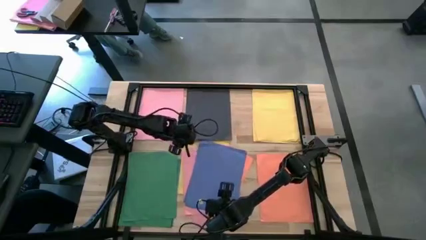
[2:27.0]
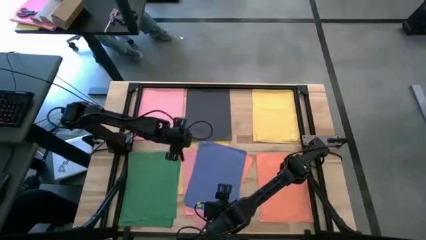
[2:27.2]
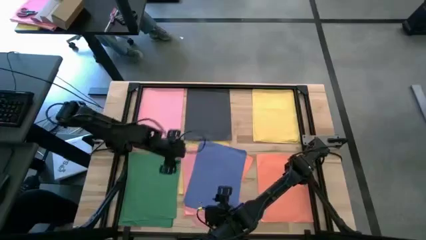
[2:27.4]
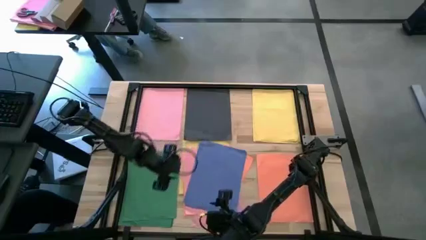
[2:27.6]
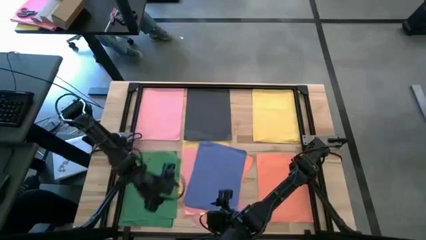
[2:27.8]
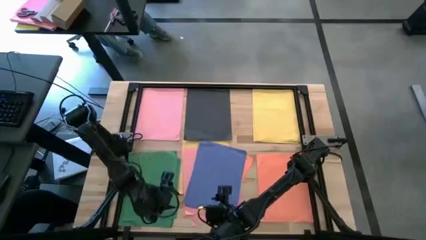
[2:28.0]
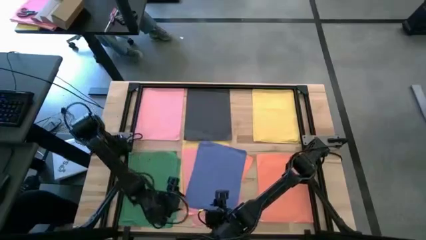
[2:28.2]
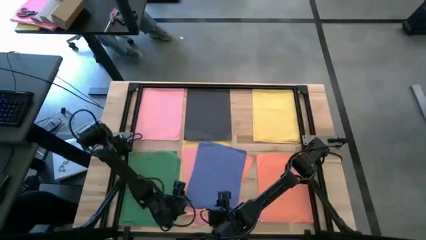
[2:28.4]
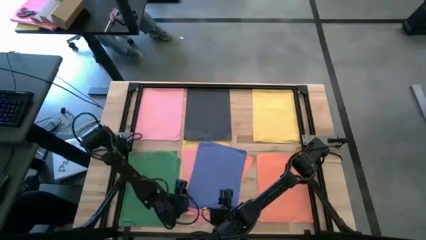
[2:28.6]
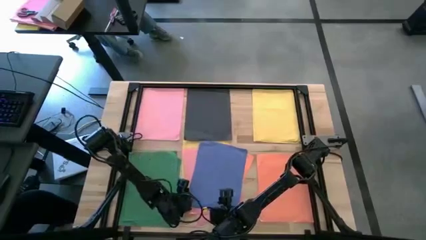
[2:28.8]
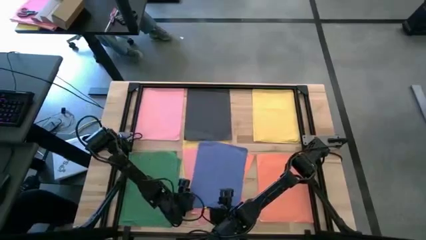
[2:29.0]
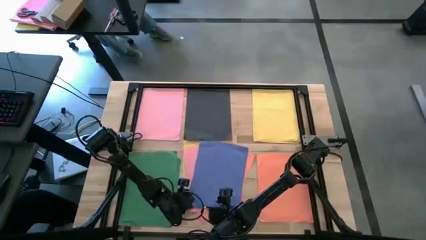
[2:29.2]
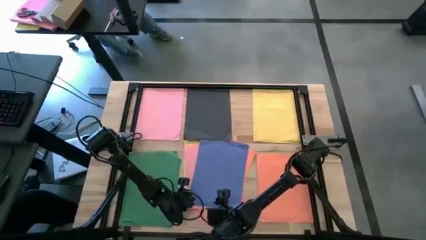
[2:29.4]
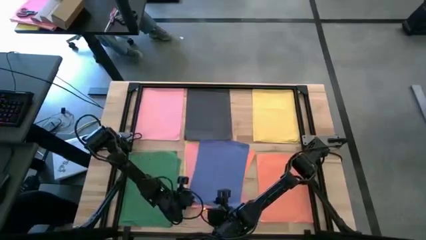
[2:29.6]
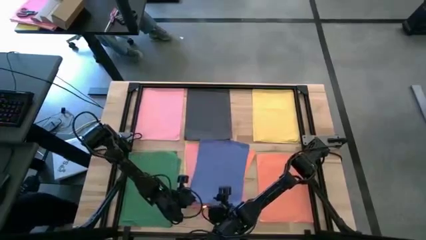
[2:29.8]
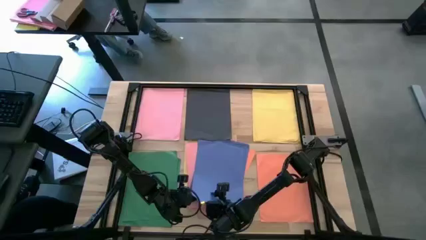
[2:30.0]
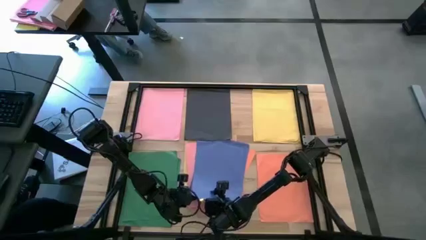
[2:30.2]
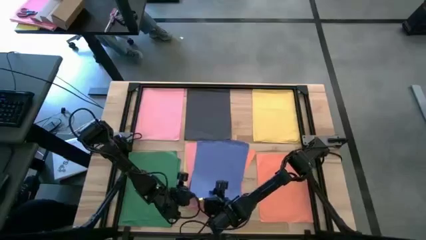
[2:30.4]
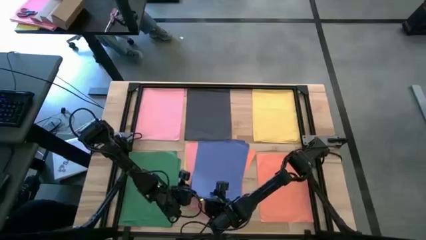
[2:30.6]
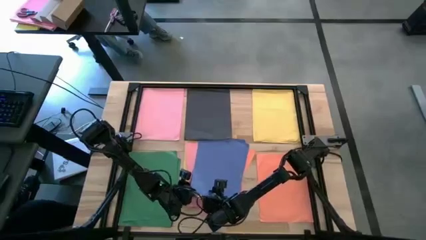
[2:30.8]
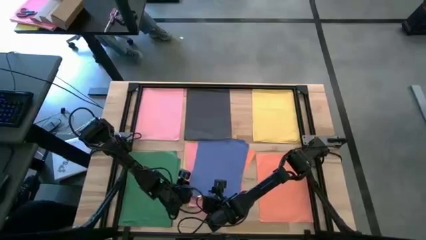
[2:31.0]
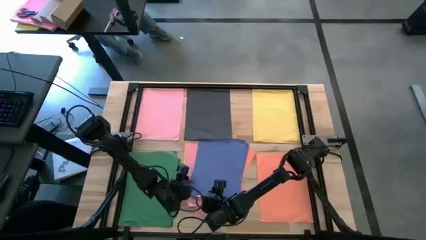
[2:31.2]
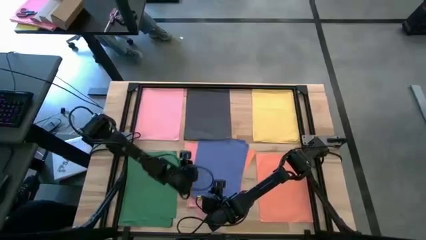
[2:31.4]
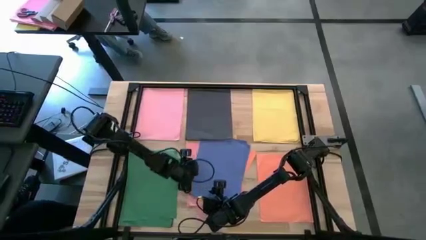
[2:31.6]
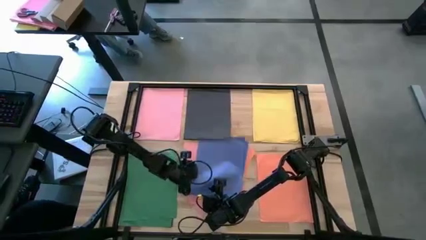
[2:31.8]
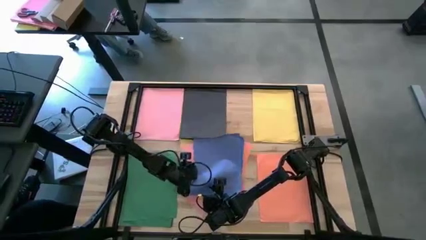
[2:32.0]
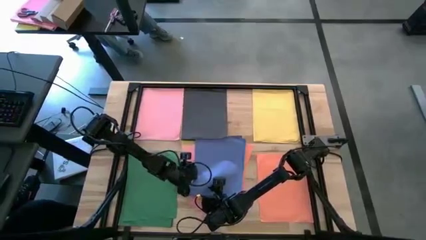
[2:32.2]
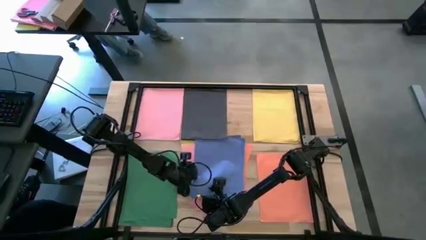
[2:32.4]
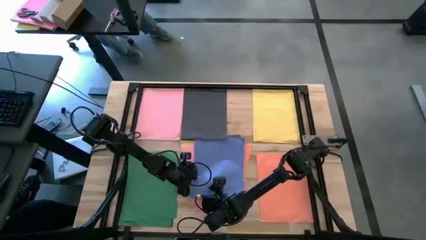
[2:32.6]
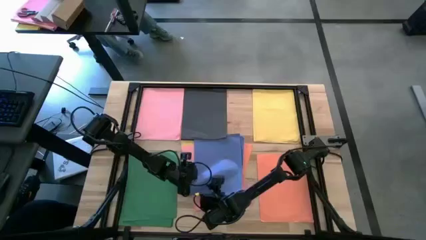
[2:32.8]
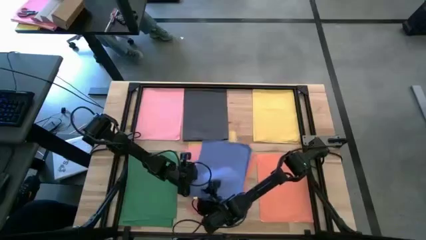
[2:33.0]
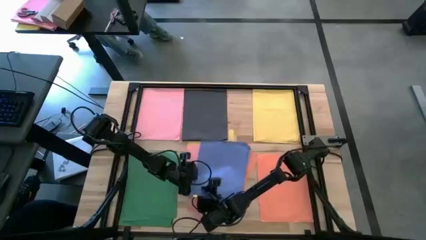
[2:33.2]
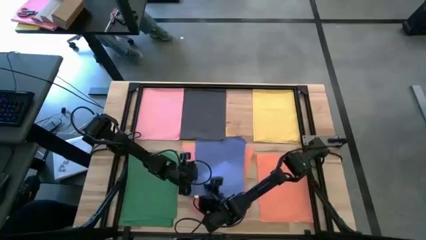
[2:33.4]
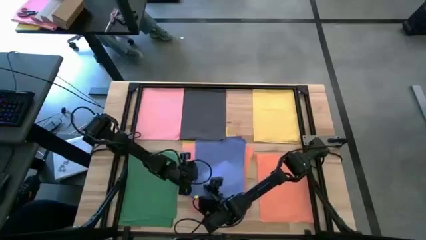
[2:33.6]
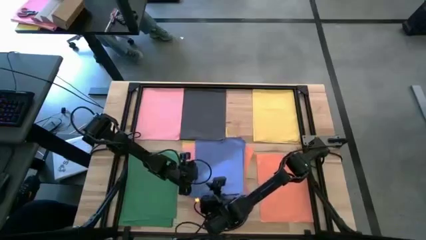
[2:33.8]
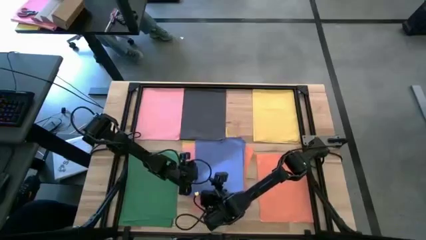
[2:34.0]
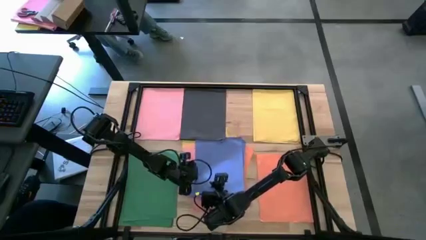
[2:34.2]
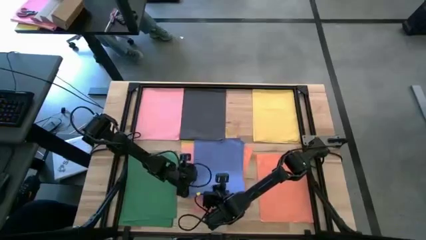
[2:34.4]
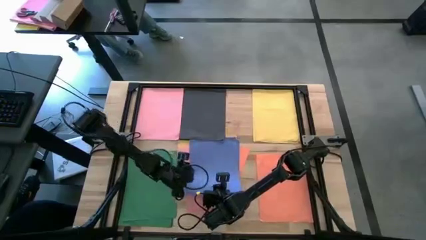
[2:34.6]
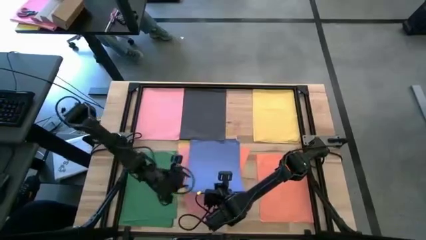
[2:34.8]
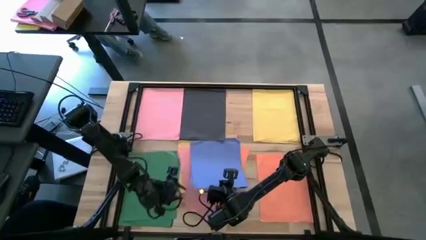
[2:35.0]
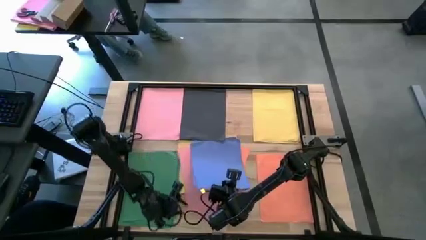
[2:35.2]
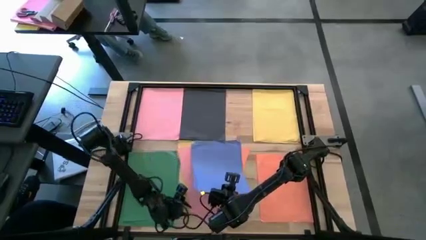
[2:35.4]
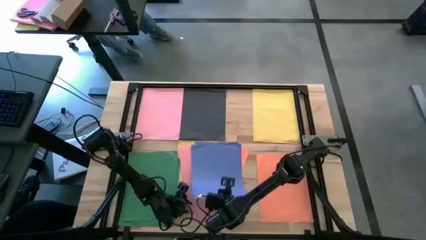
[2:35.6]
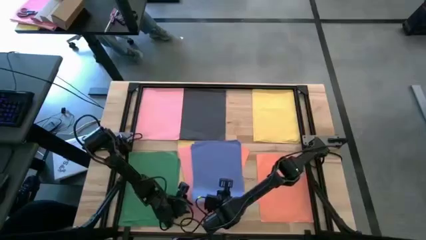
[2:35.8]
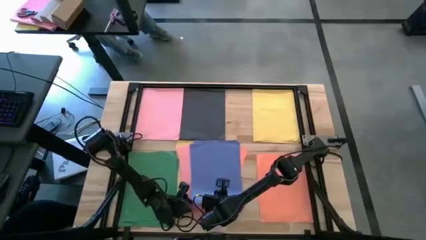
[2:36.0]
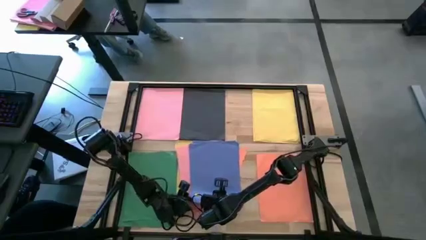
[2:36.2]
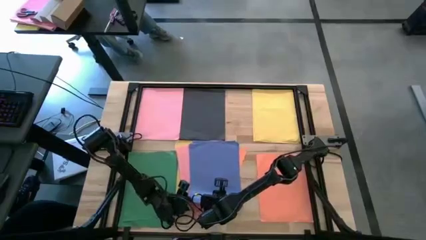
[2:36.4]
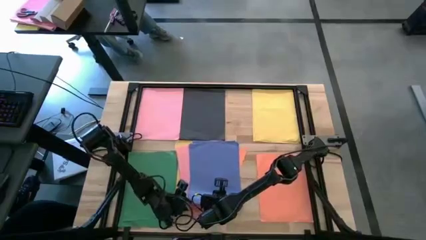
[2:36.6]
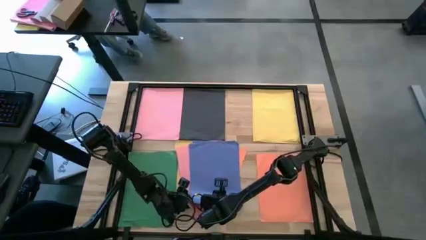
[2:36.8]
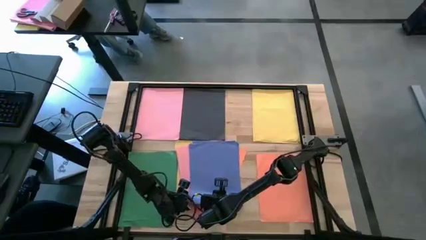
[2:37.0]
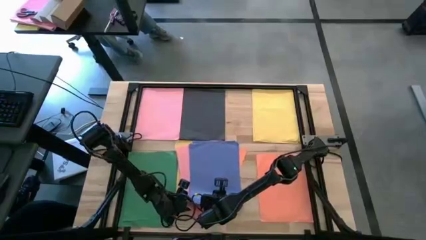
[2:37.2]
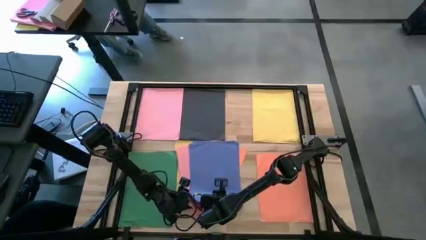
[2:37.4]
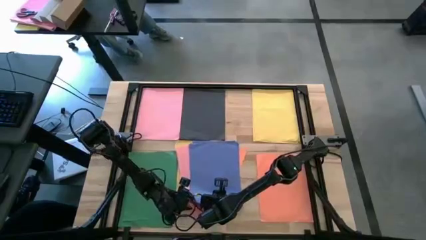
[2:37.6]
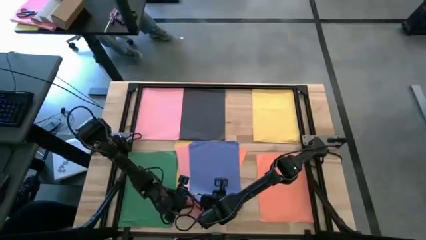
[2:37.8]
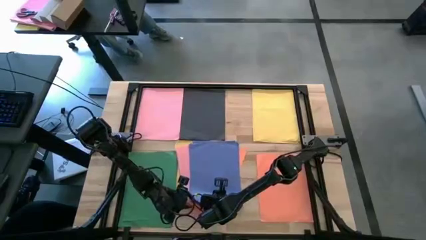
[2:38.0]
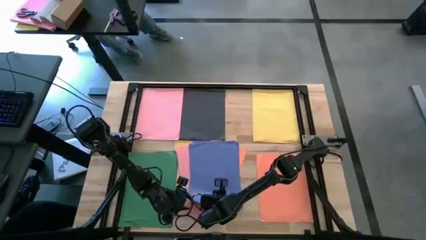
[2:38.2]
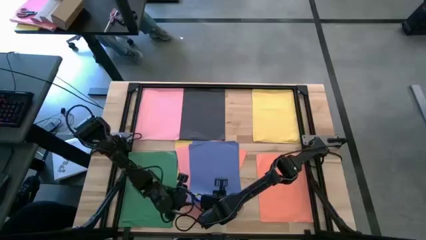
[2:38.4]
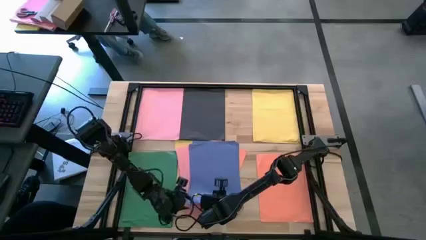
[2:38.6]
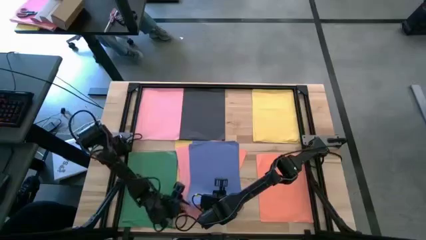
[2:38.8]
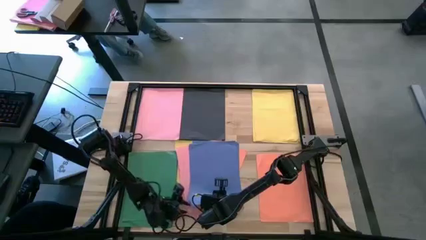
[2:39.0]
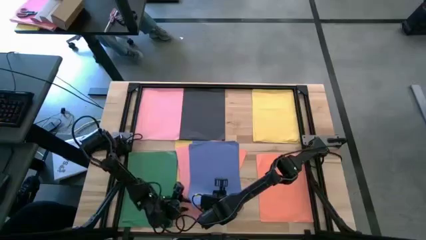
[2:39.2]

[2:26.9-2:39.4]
Task: Organize paper
Stack the pink color paper on top of the other pink color paper

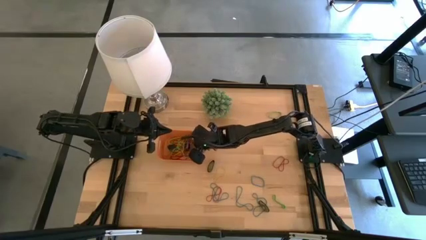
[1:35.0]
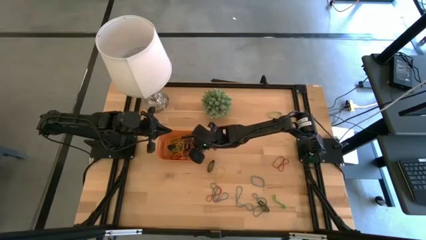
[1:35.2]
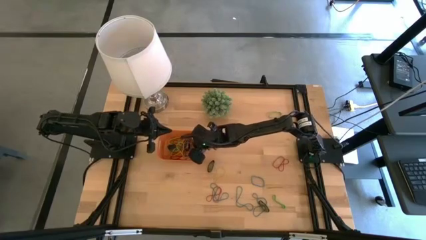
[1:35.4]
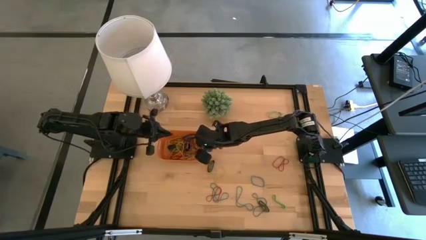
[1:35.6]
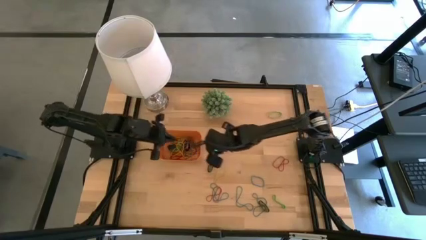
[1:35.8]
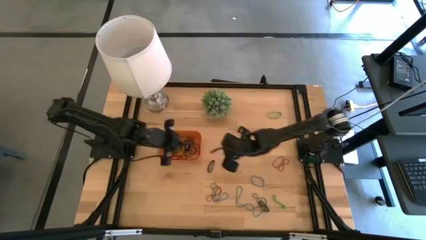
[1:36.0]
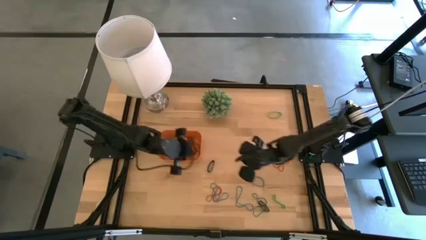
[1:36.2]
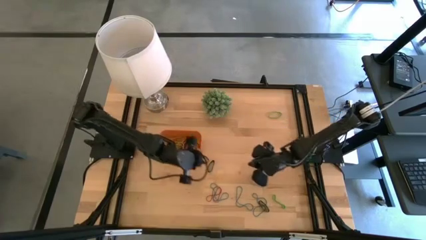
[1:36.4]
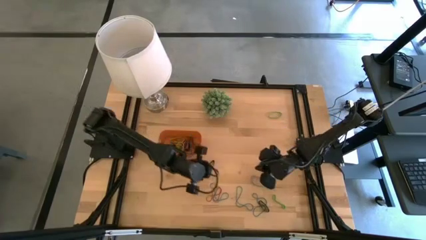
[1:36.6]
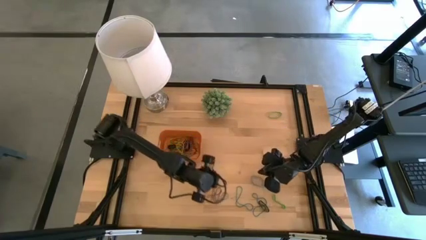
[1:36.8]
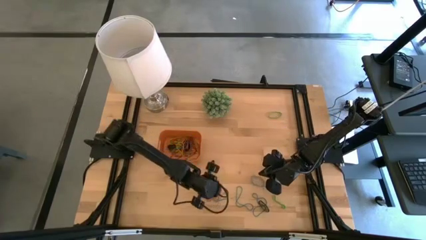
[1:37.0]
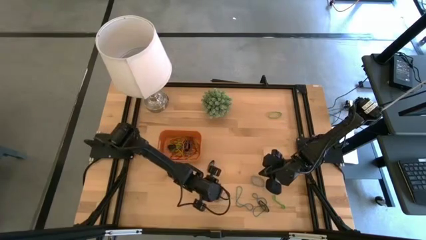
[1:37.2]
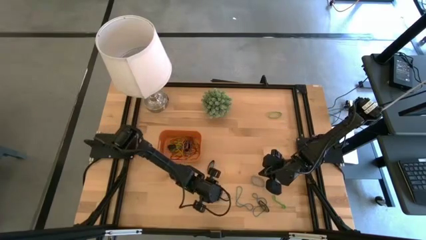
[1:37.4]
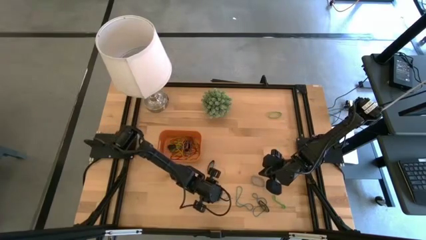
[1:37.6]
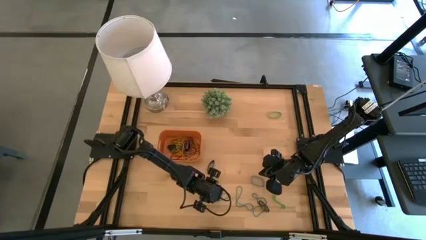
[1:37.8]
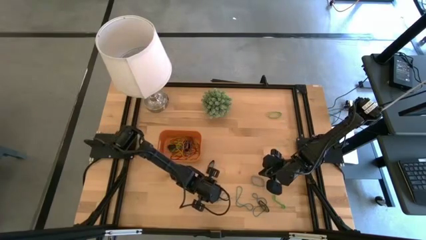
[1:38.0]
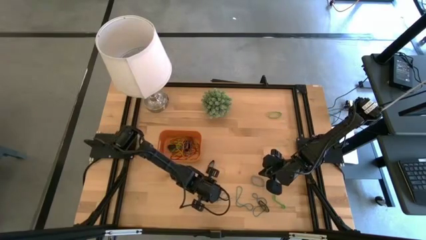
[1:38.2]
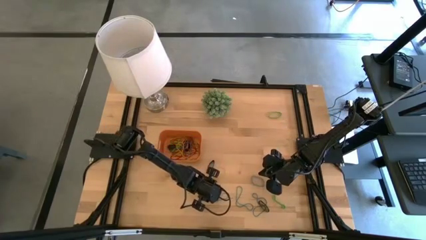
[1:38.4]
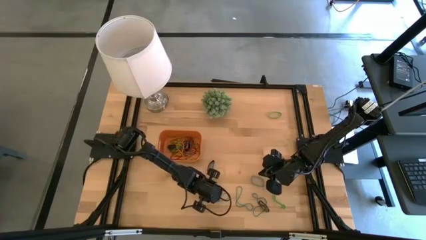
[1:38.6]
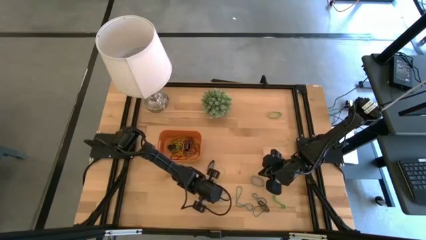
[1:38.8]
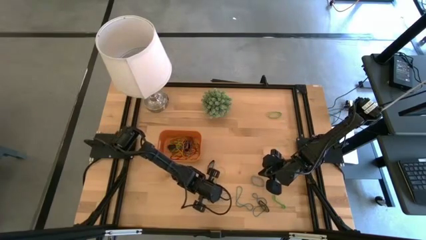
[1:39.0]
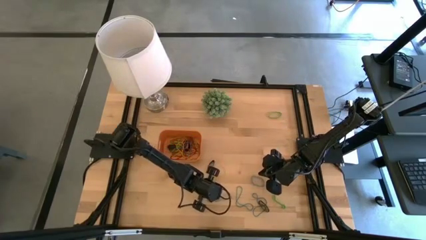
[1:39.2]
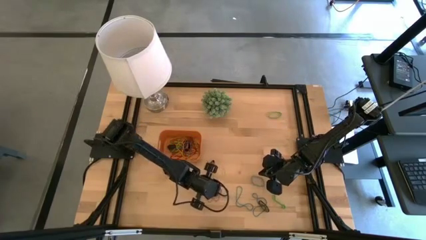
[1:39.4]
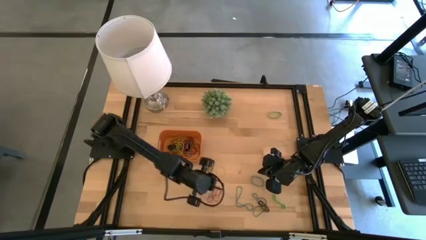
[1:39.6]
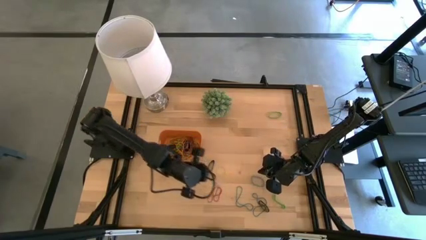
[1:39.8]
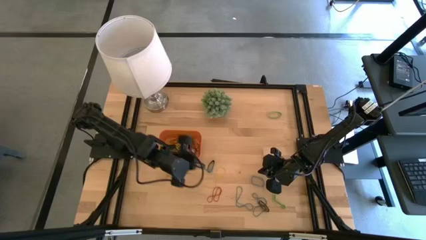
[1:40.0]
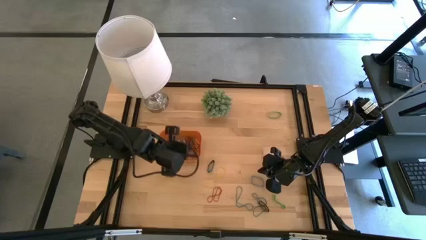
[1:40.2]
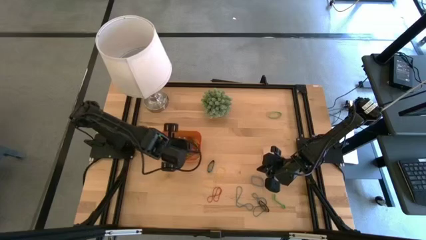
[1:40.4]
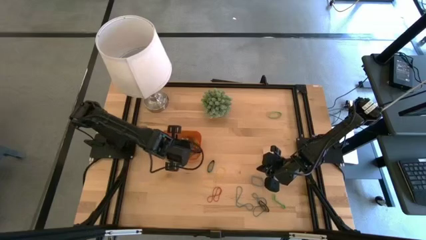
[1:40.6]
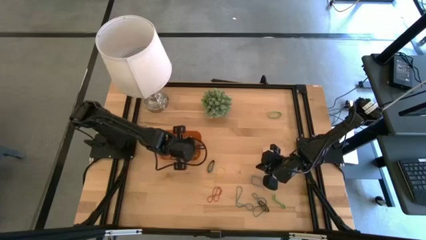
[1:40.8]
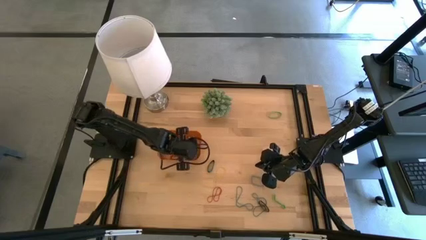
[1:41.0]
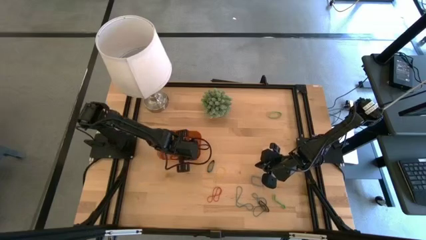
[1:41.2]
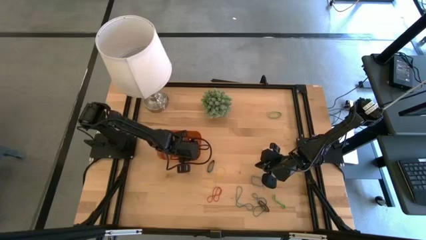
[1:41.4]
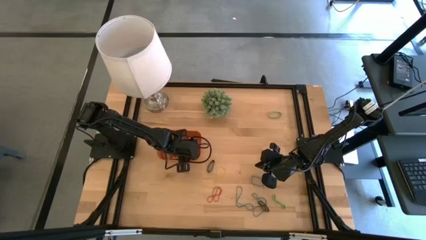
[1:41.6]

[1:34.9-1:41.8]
Task: Pick and place rubber bands into bin
Put the blue rubber band into the orange bin
